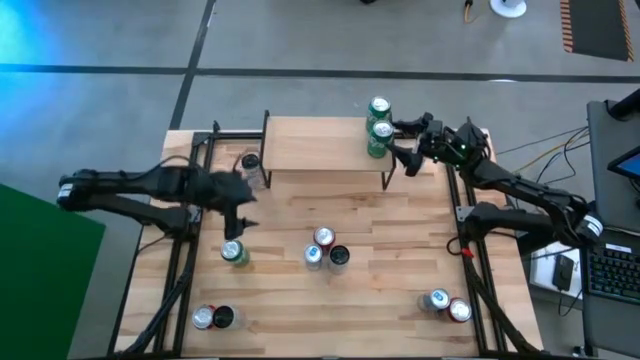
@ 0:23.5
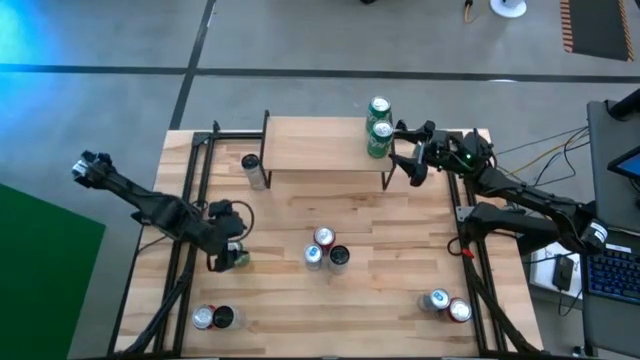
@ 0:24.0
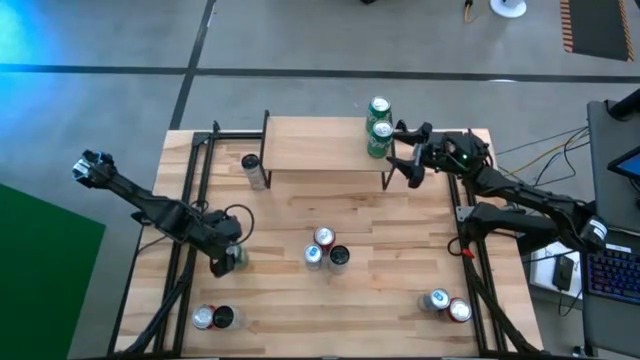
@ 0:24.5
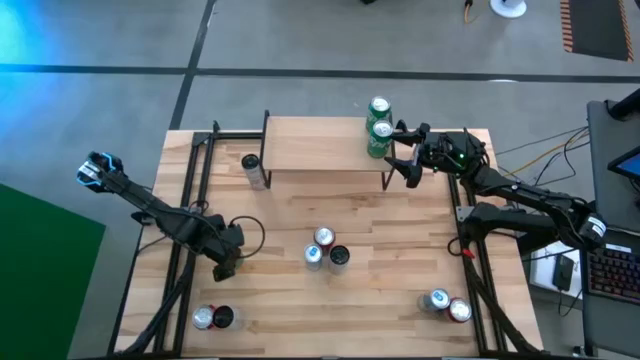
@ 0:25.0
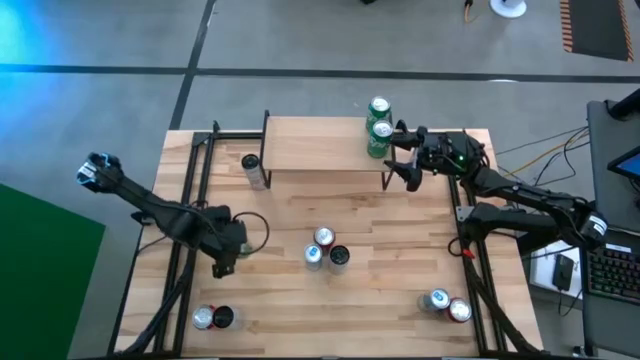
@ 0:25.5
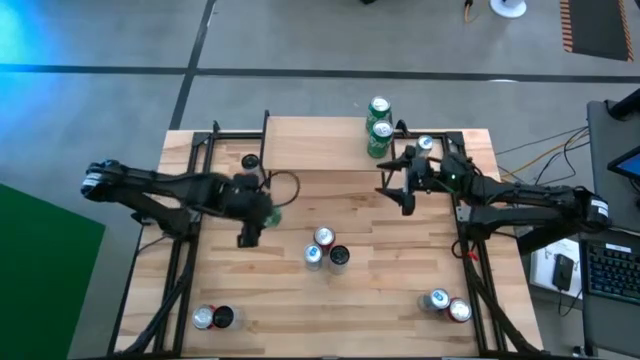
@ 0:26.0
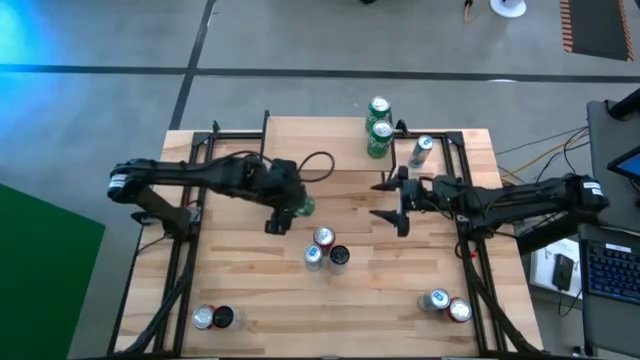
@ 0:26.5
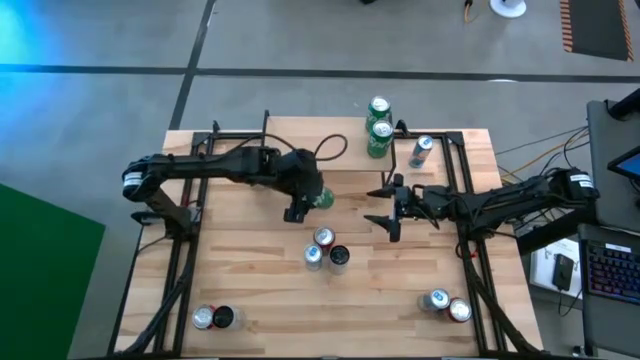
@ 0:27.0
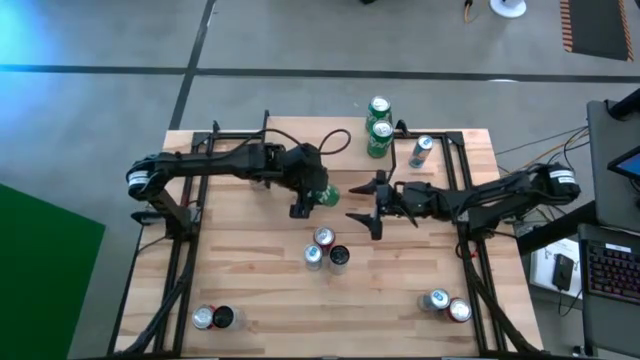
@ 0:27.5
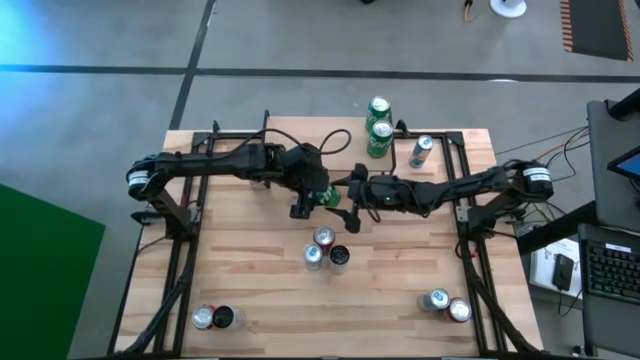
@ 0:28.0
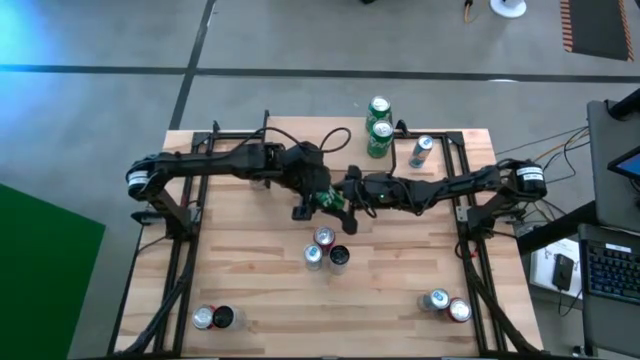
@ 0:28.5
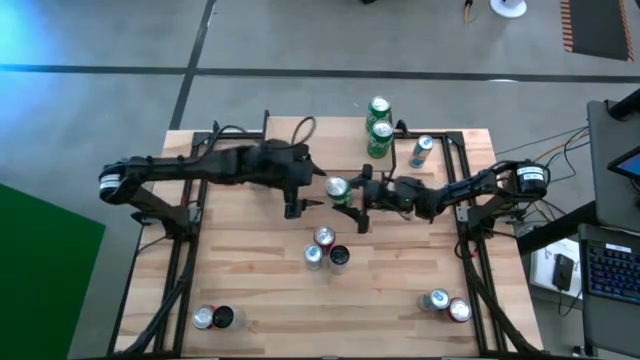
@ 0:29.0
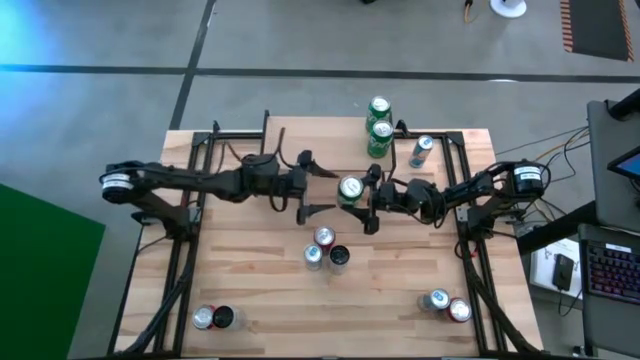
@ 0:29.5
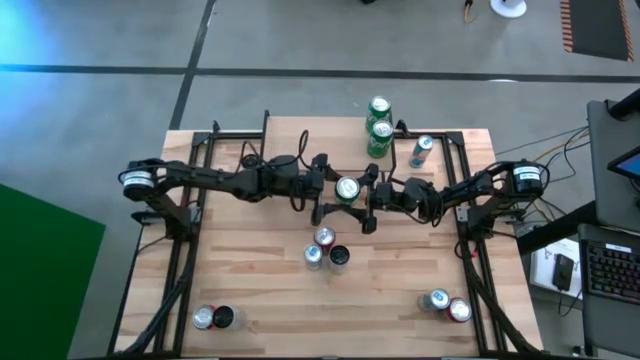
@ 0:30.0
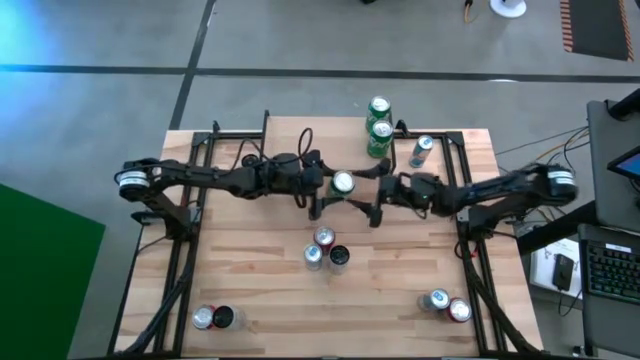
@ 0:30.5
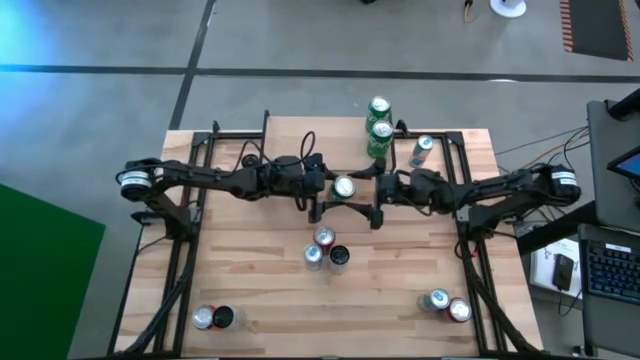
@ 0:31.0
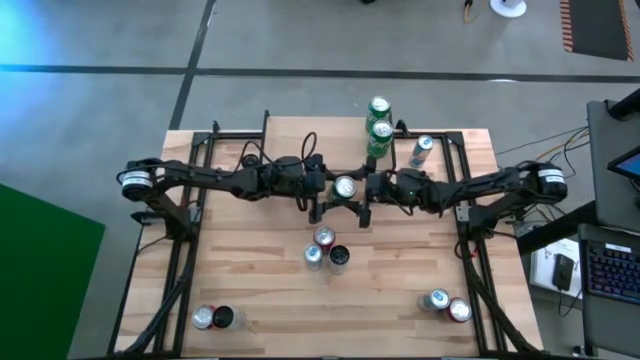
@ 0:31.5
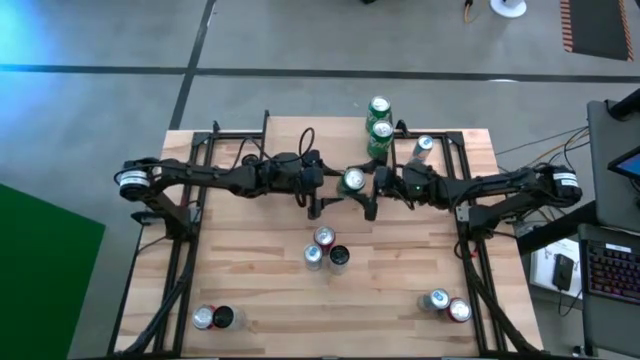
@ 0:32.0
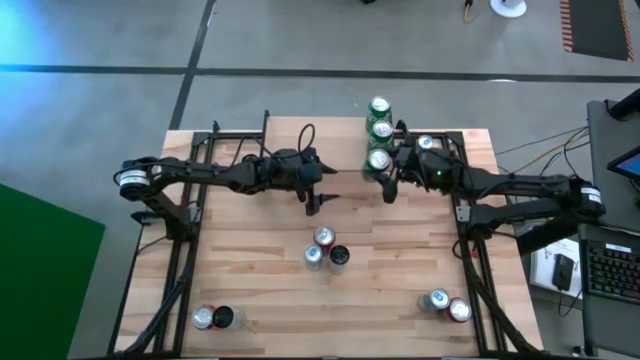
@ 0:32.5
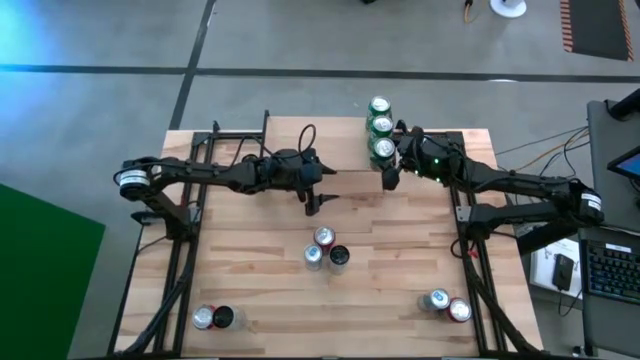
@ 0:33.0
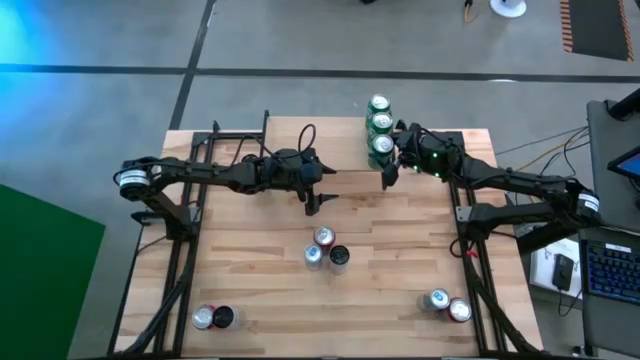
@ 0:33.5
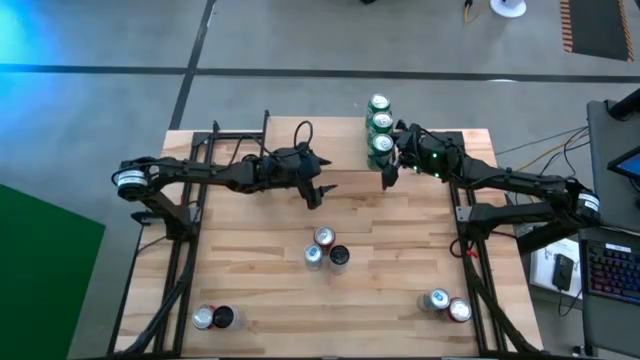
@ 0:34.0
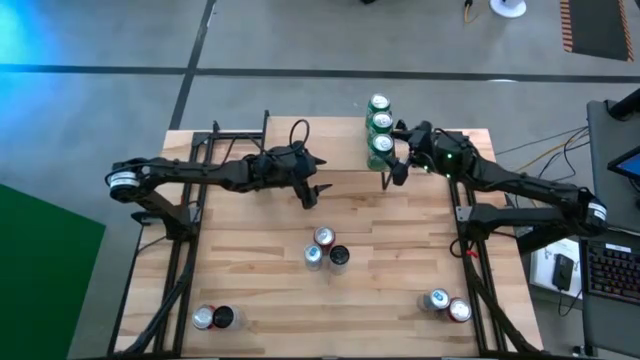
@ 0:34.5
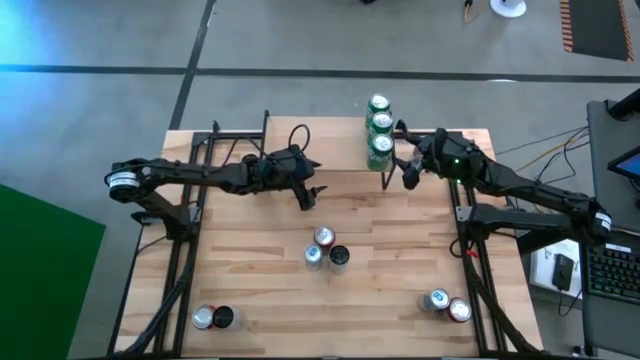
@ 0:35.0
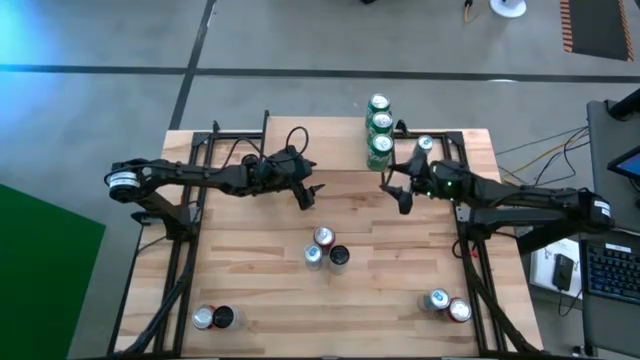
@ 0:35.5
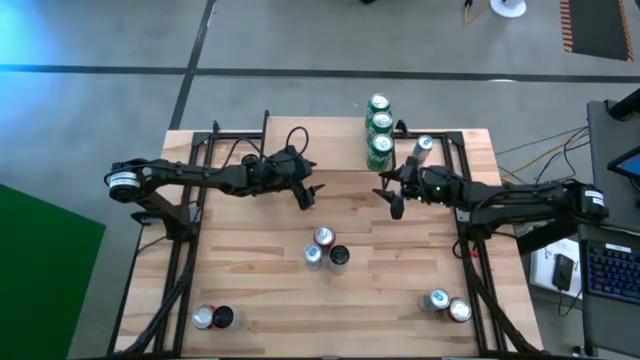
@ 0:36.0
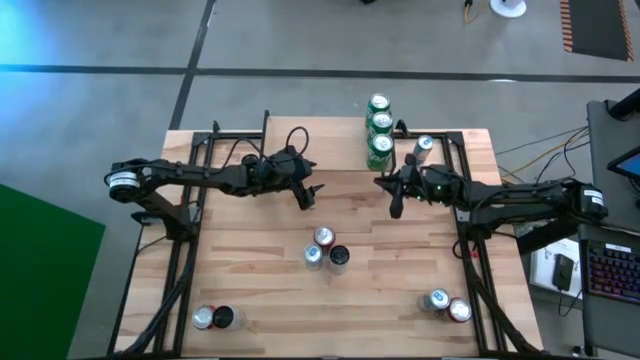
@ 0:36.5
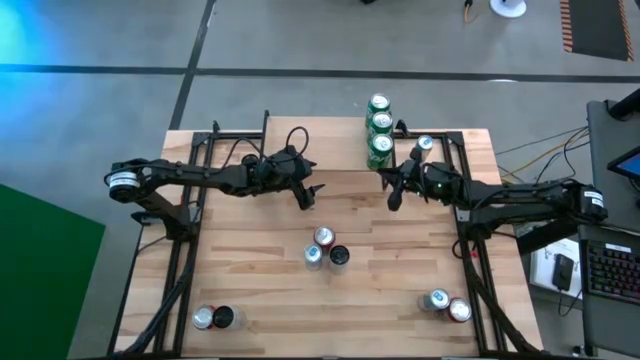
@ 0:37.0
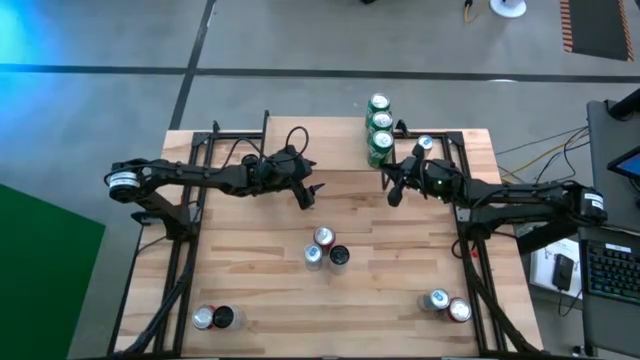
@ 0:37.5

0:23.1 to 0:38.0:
Task: Place canned beverage on shelf
Put the green soda can on the shelf aligned with the other green soda cans

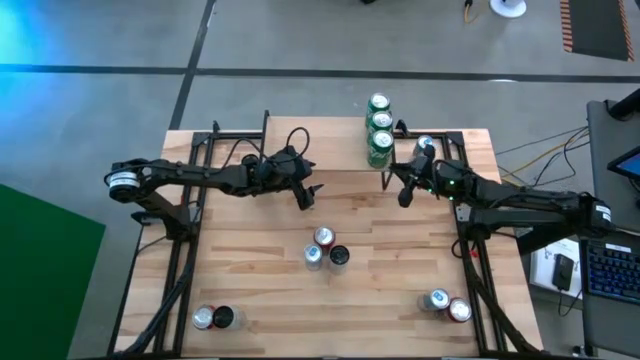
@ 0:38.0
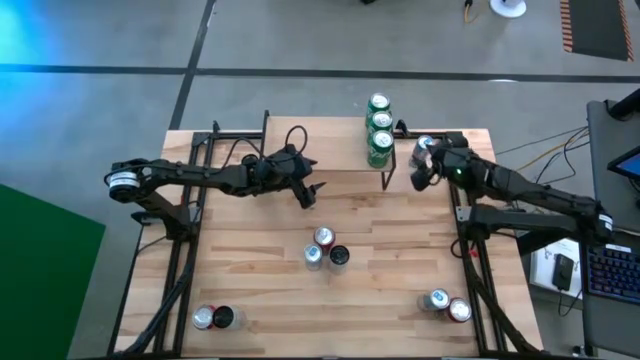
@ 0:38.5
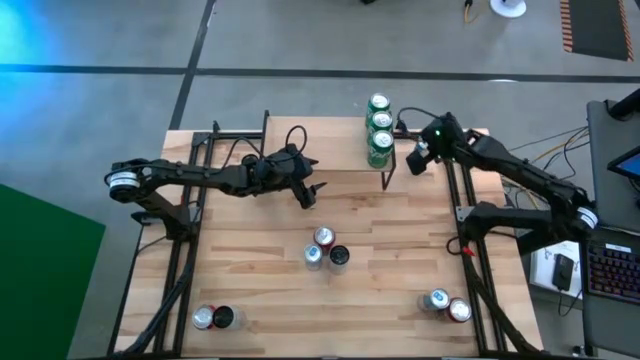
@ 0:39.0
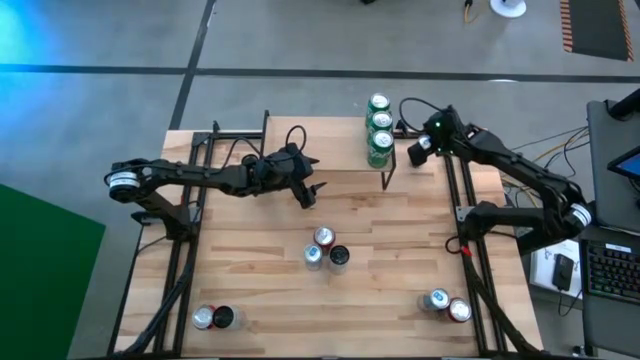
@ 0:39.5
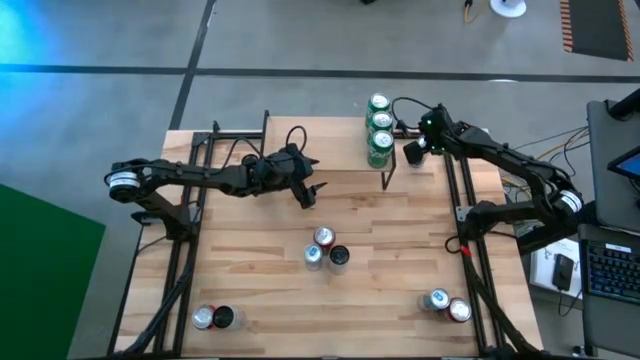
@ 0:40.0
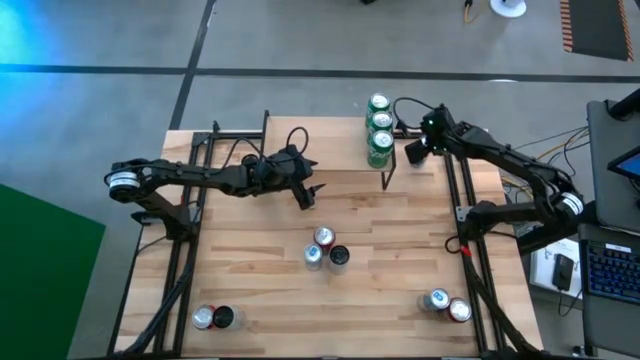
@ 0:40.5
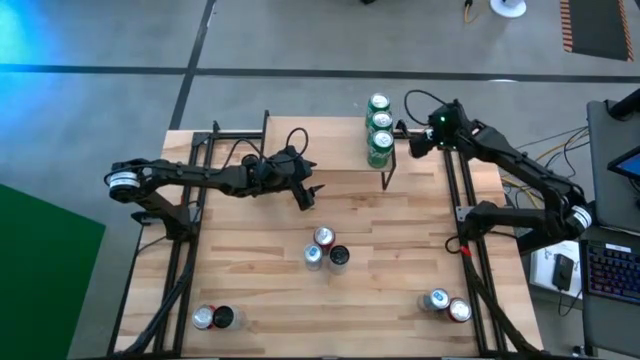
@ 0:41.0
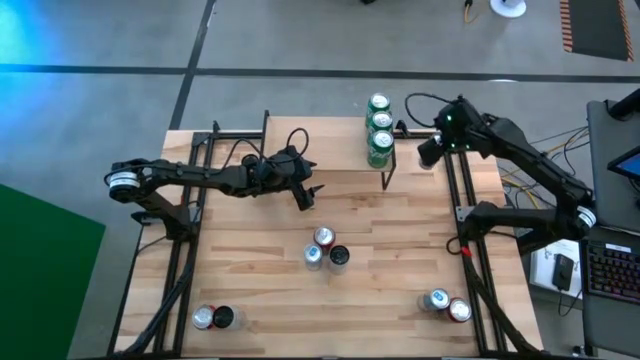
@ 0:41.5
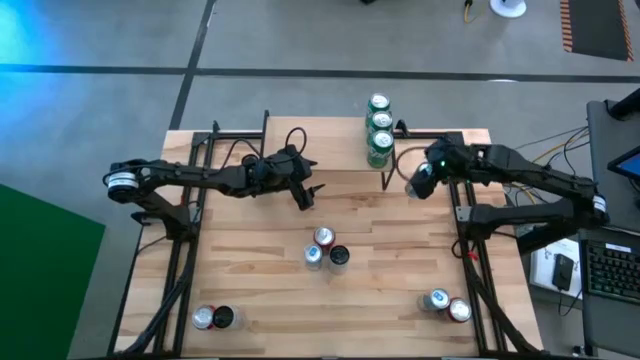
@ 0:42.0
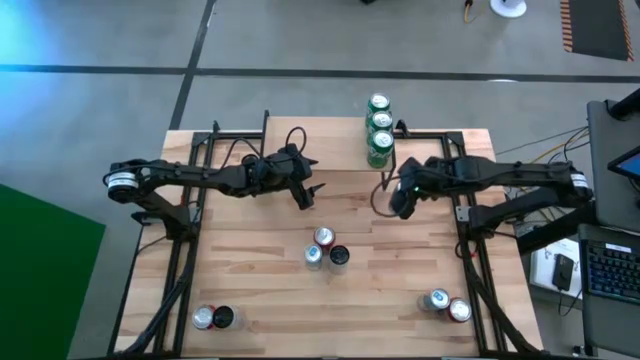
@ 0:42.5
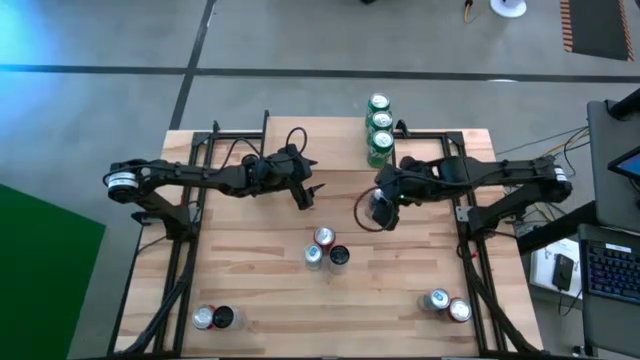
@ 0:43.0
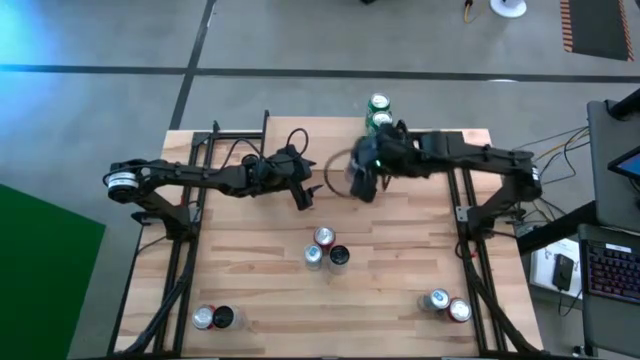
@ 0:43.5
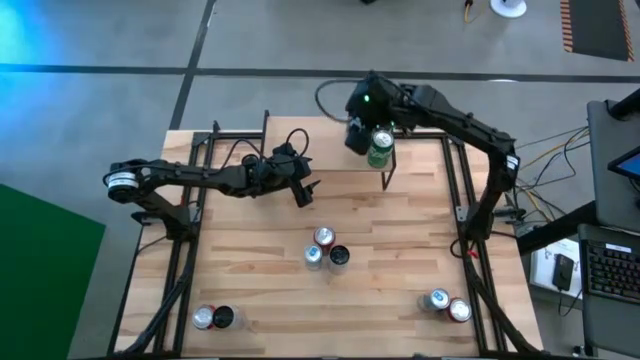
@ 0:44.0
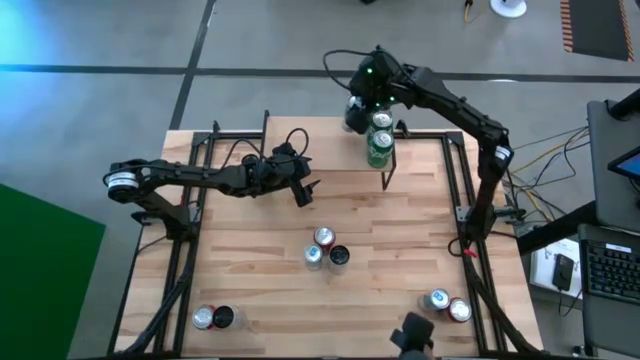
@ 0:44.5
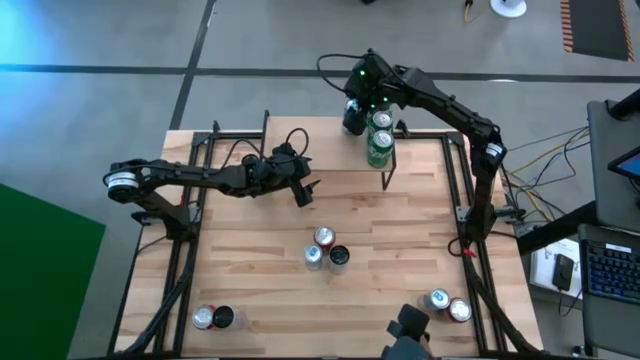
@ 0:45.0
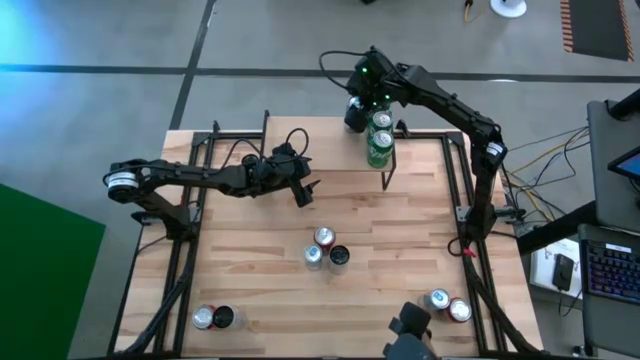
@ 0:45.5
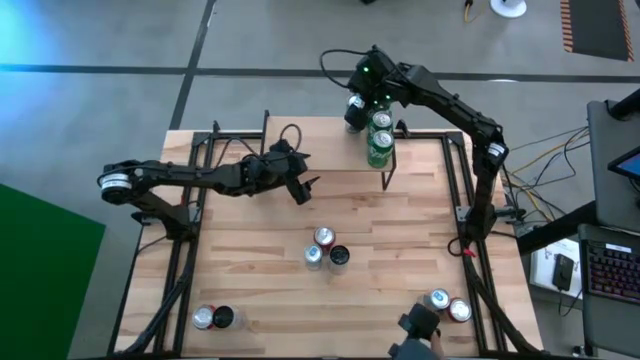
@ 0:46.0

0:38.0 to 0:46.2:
Put the top right blue soda can on the shelf
